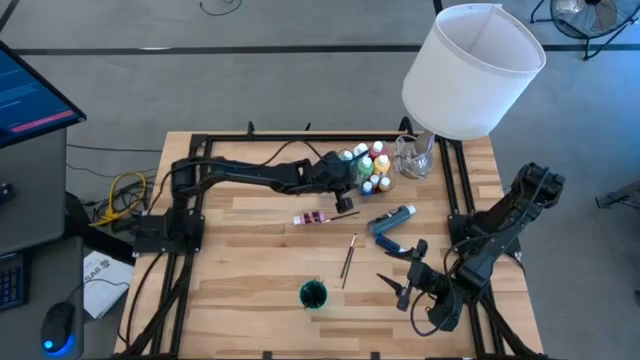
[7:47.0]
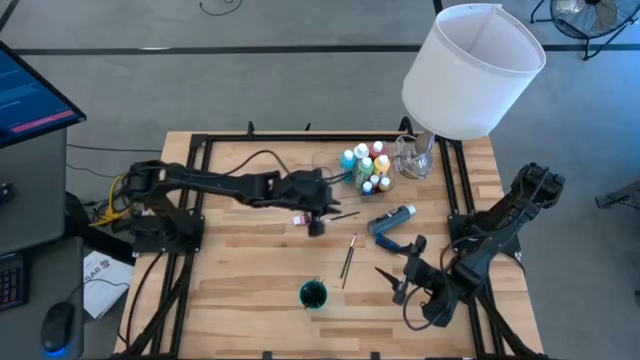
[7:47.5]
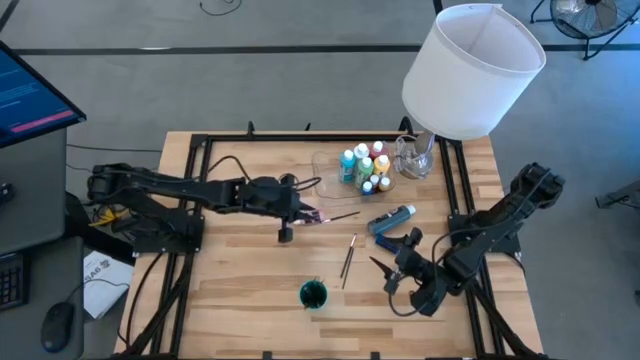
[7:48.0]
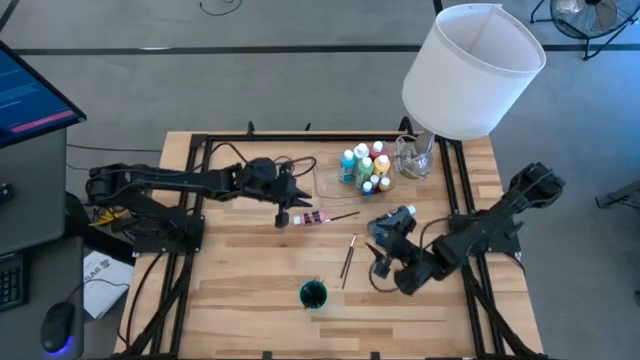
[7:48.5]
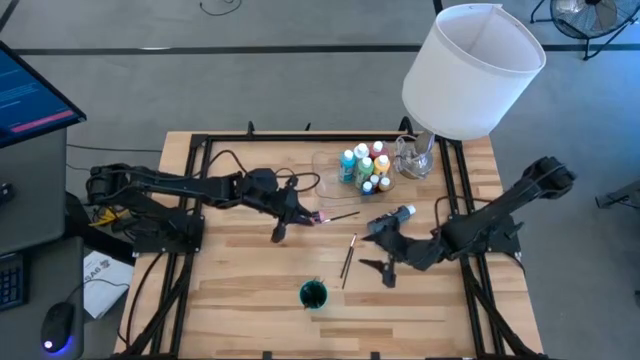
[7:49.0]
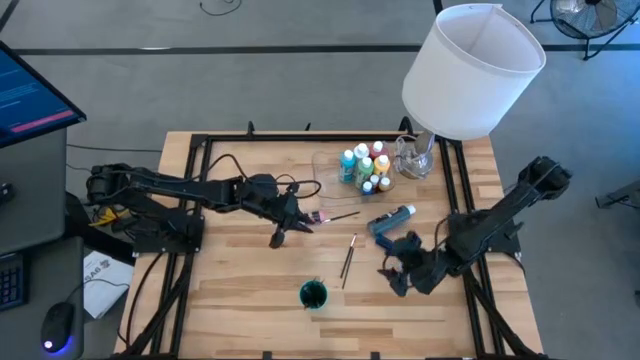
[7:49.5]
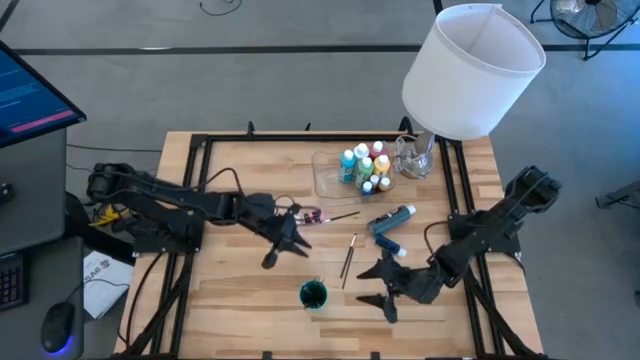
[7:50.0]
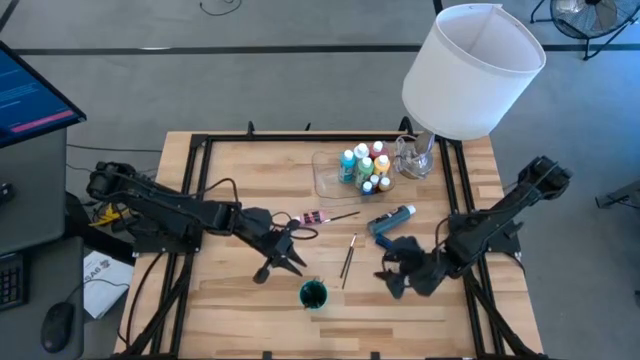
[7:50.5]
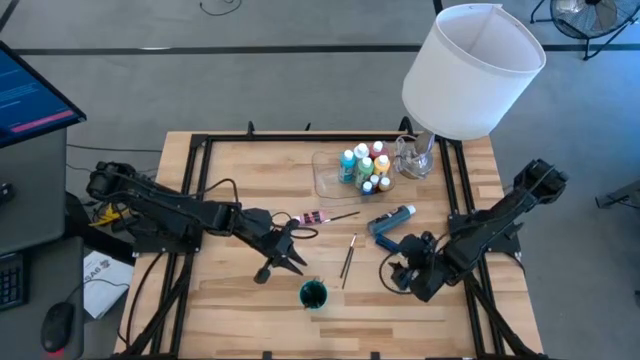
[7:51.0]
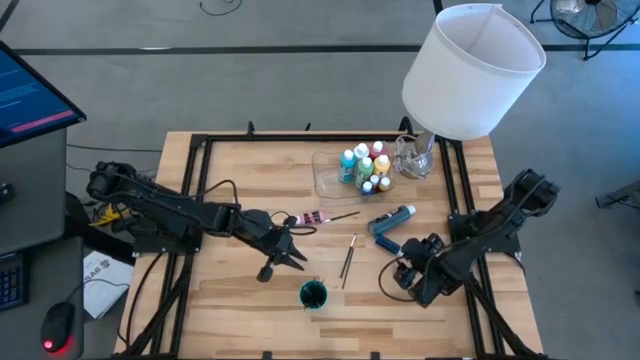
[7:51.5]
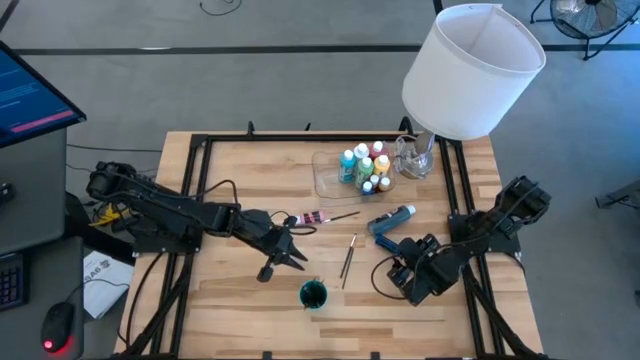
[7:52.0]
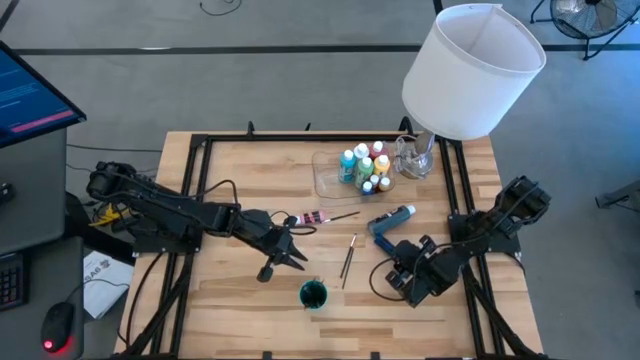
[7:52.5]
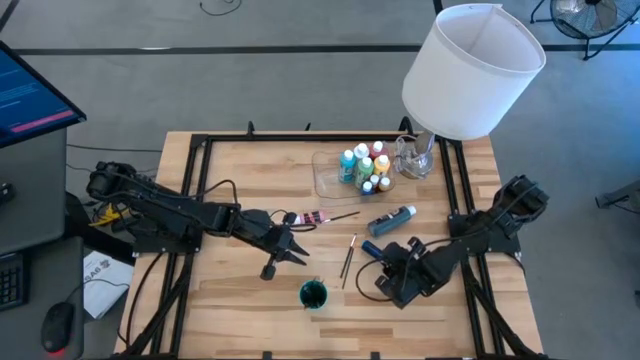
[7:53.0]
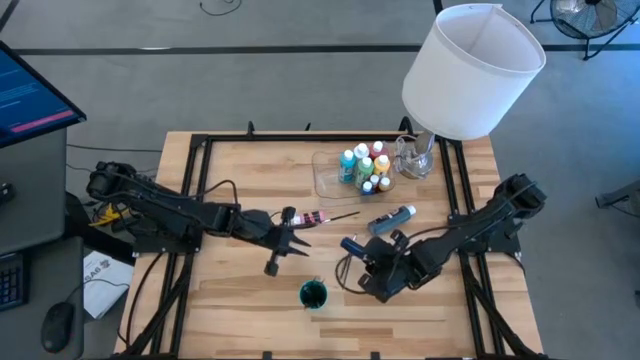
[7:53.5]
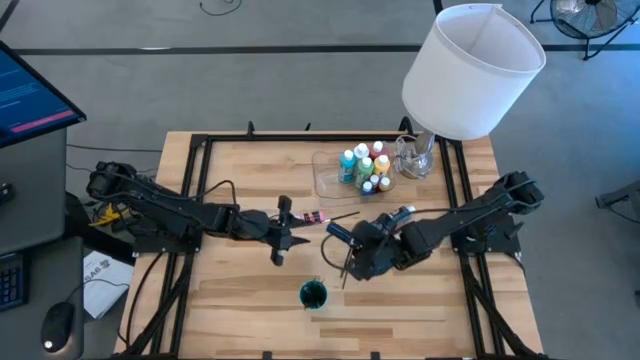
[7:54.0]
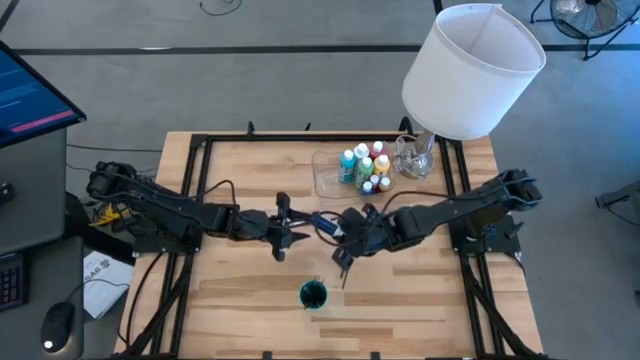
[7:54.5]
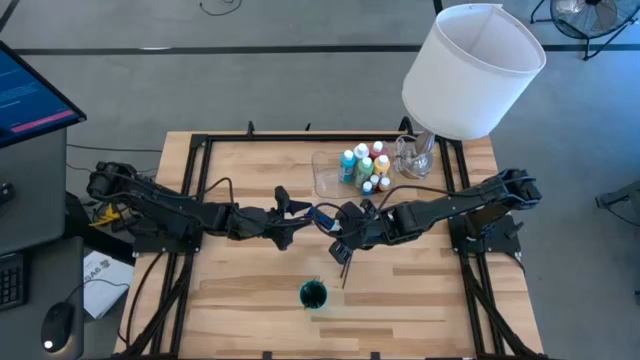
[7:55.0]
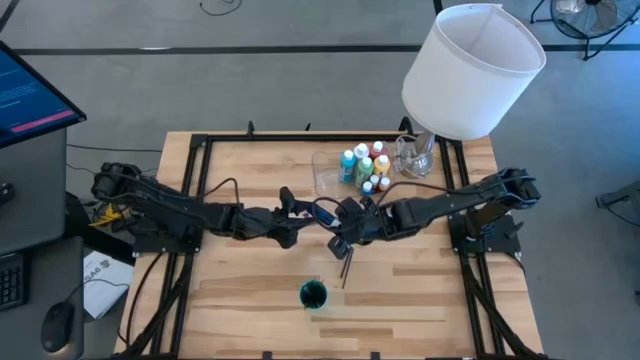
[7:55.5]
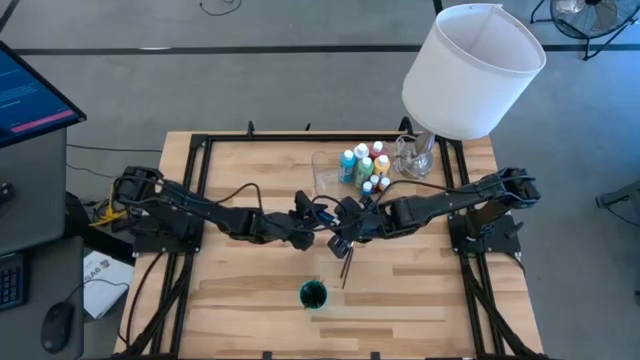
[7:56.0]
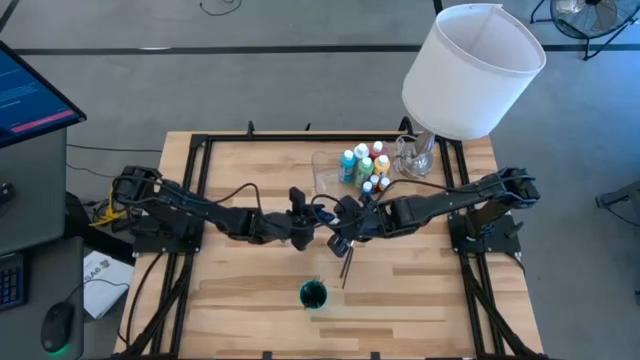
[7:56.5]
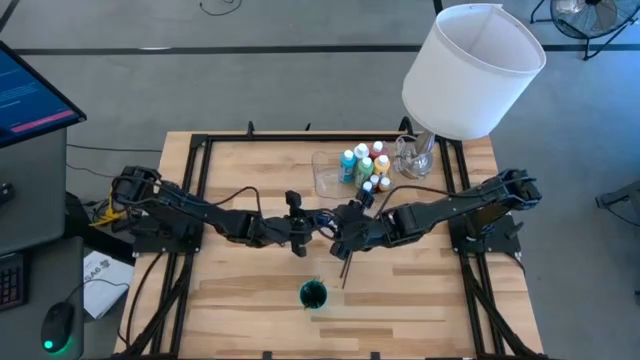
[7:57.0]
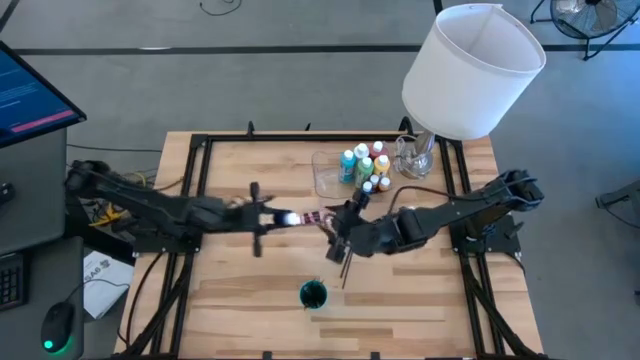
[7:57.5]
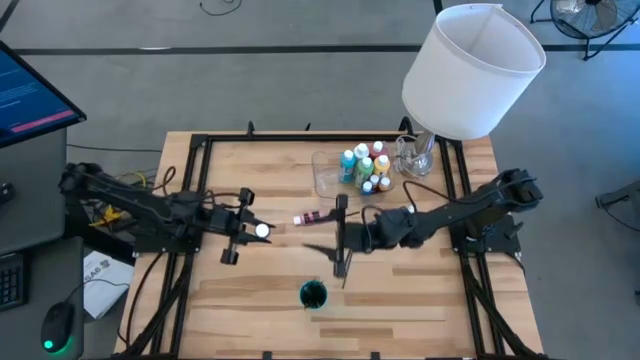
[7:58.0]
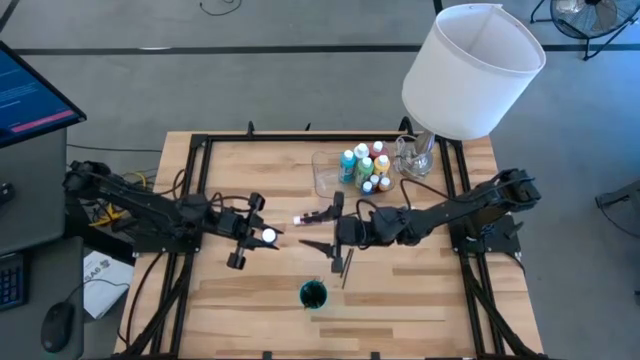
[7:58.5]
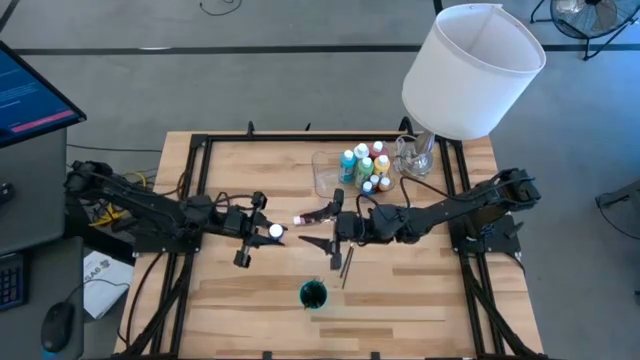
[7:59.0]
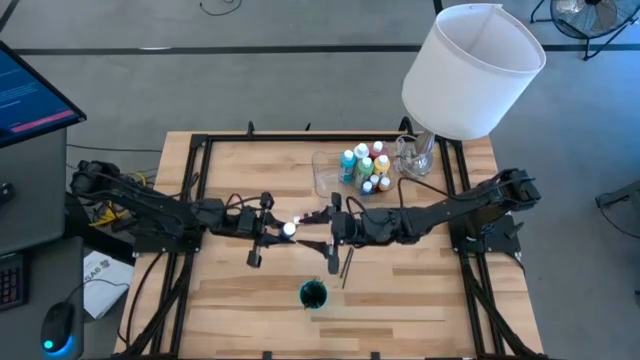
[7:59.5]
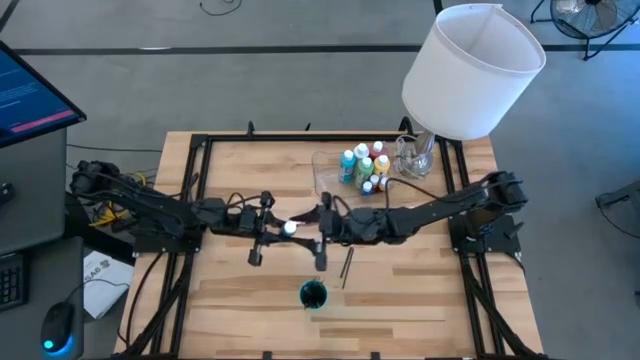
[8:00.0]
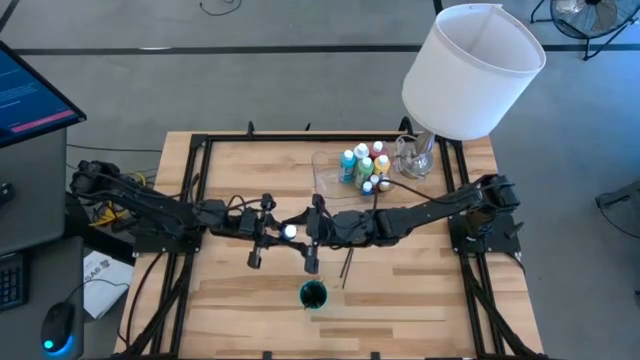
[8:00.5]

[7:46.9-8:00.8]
Task: Pick & Place Paint Supplies
Put the small blue paint bottle into the transparent bin
